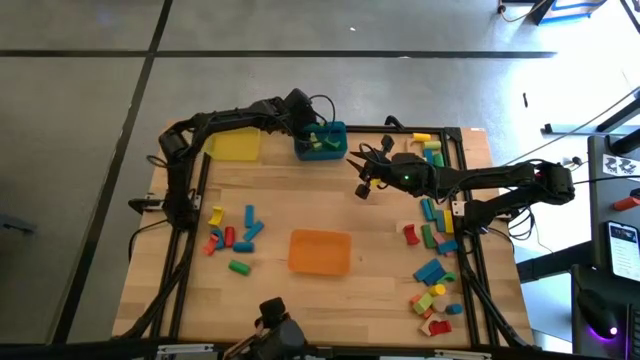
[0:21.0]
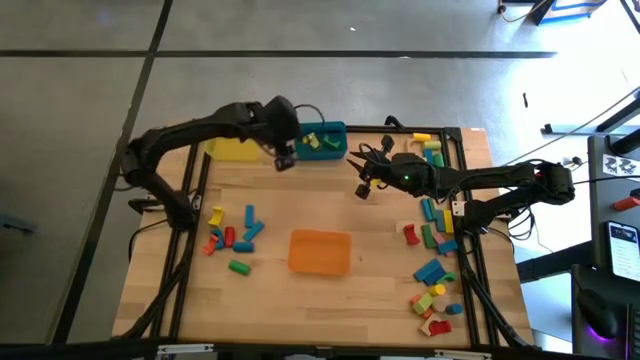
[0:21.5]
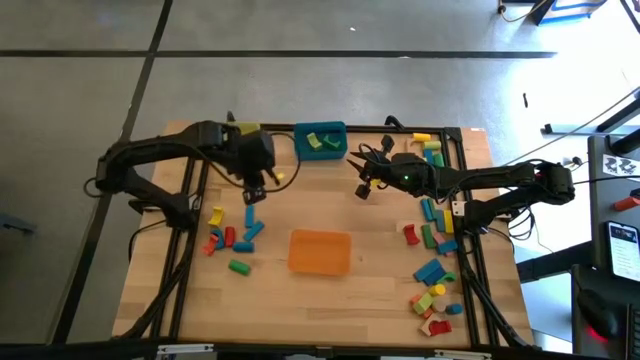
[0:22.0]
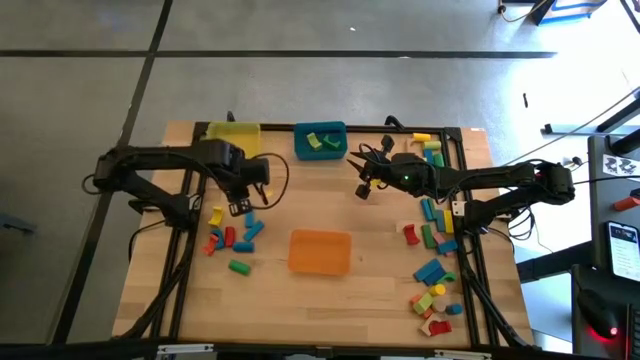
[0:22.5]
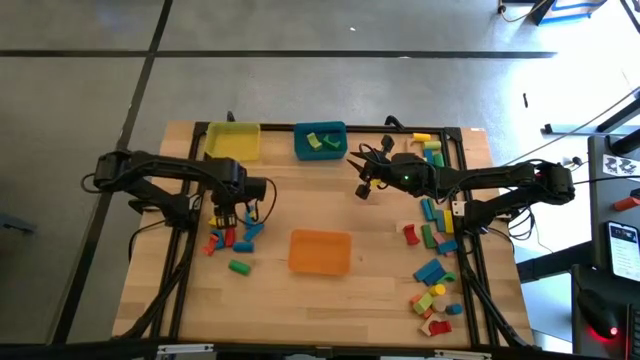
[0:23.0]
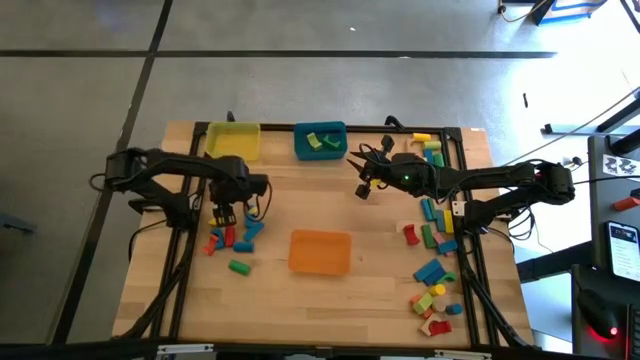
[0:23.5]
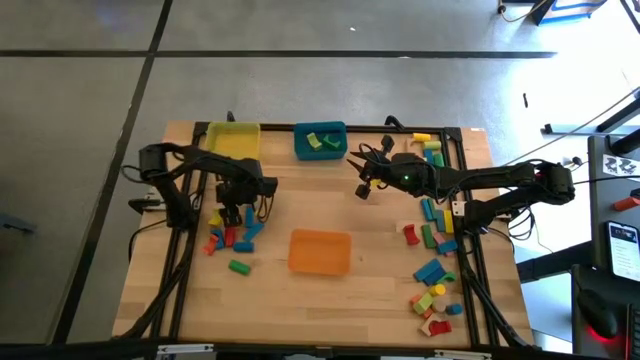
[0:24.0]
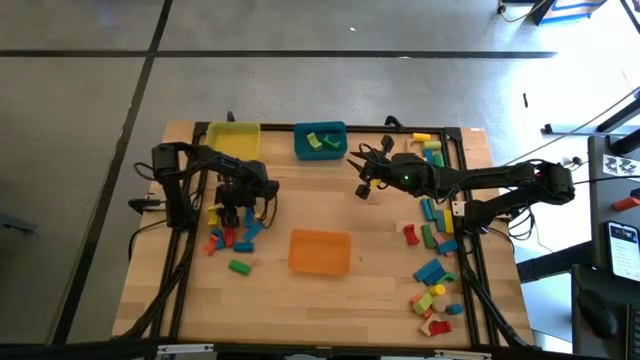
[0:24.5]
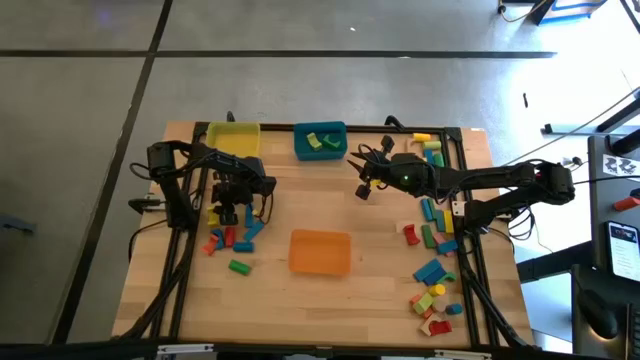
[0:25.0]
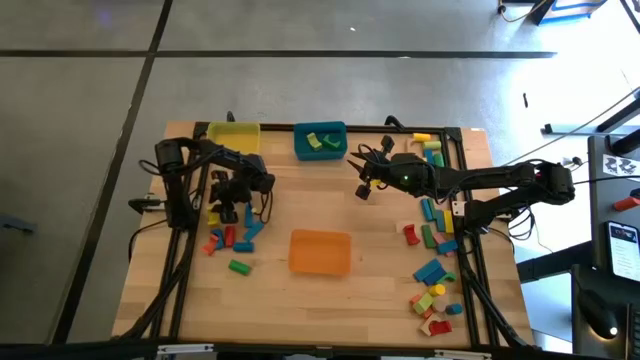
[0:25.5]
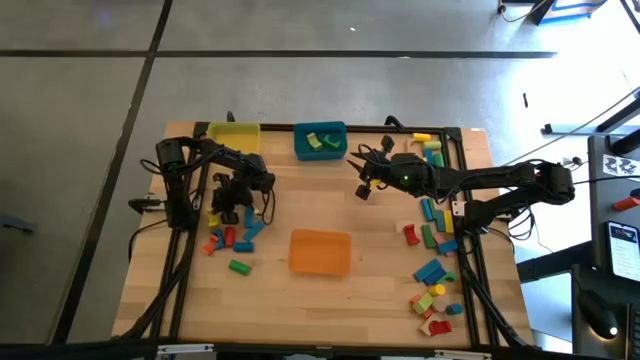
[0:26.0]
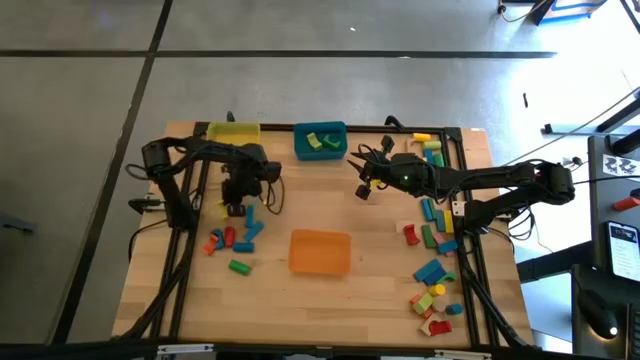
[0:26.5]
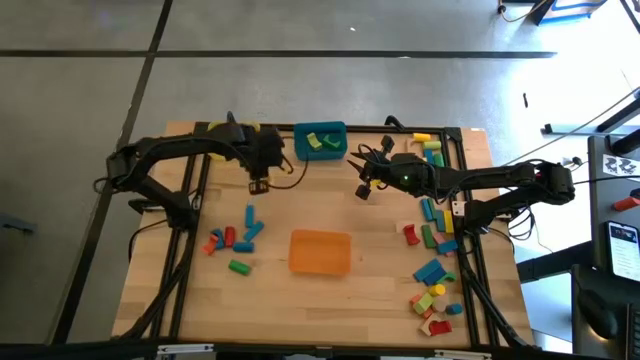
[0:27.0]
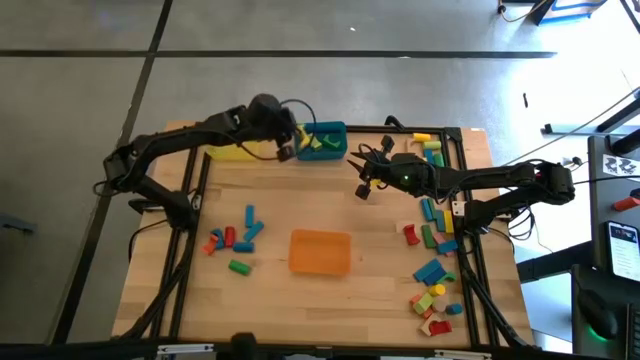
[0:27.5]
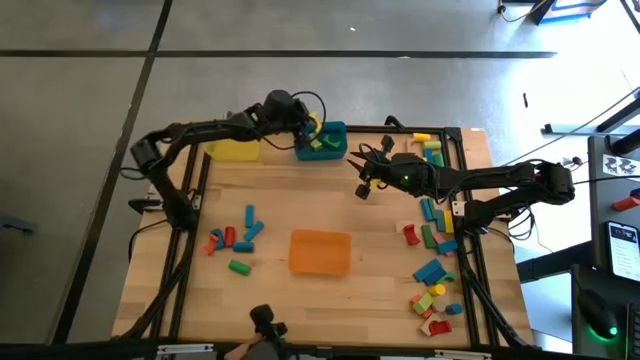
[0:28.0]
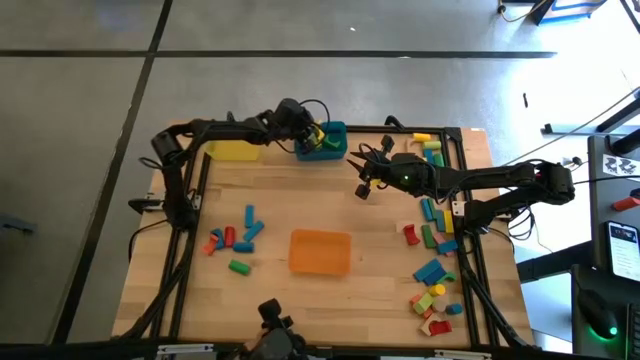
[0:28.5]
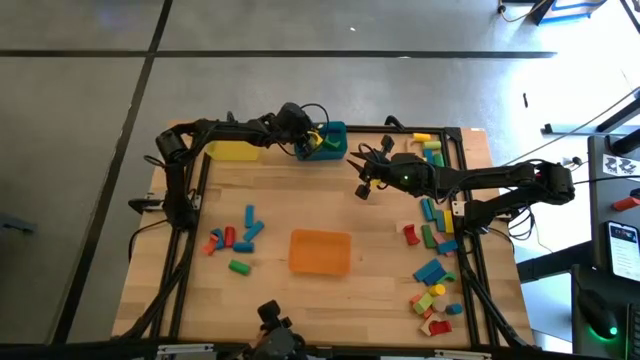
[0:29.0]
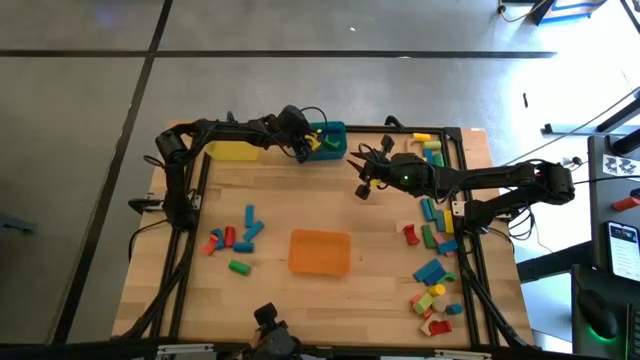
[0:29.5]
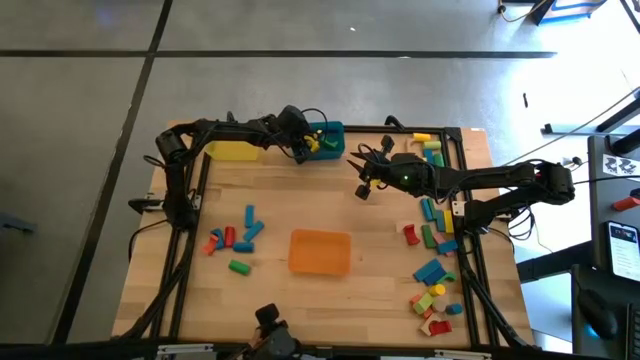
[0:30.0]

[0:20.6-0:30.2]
Task: Sort blocks by size
Put the yellow arch block into the blue bin

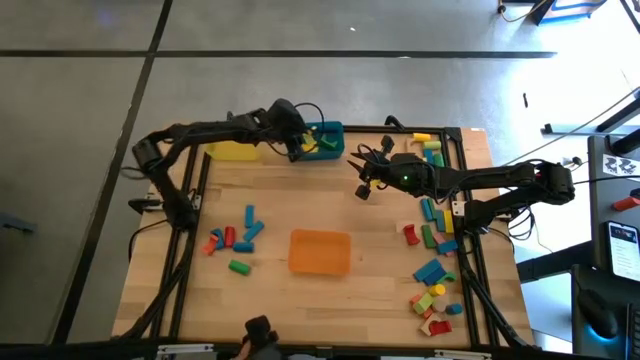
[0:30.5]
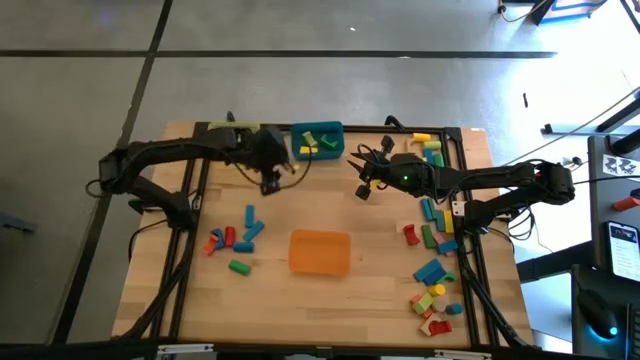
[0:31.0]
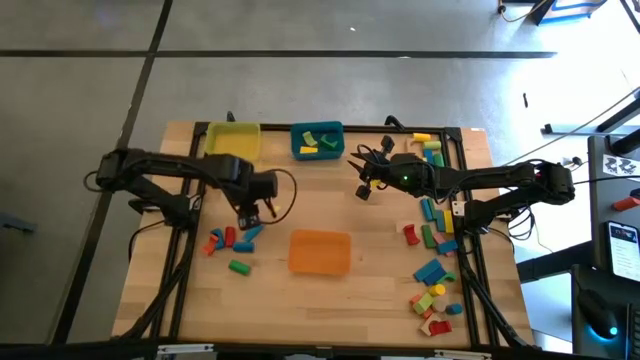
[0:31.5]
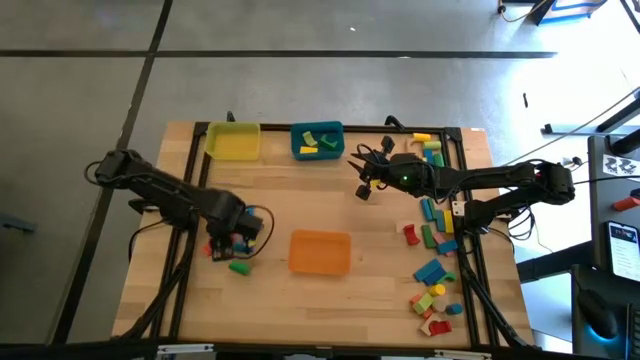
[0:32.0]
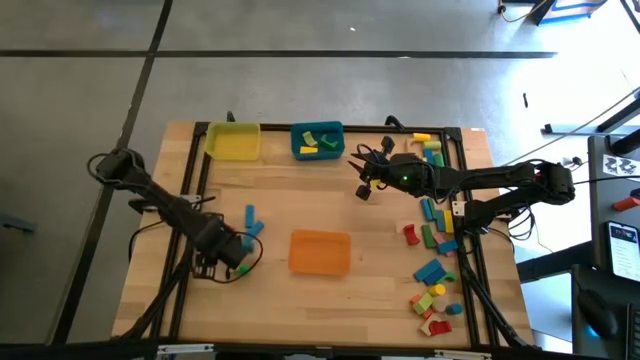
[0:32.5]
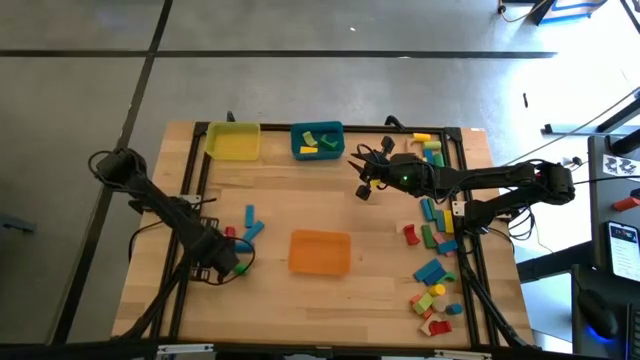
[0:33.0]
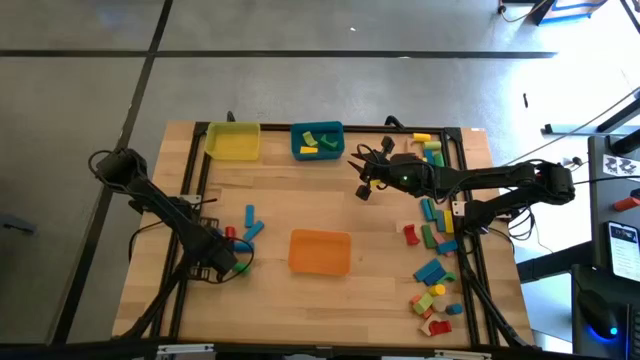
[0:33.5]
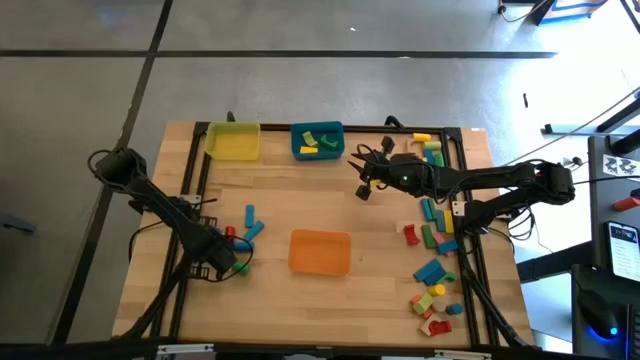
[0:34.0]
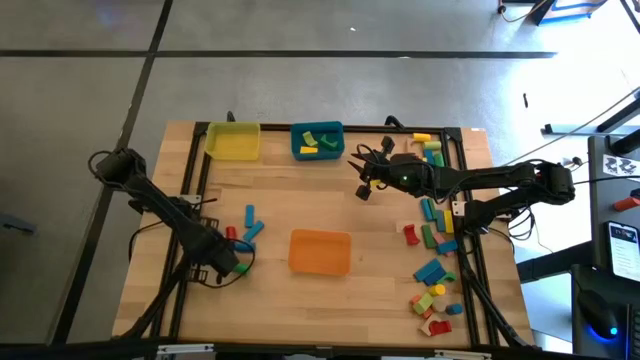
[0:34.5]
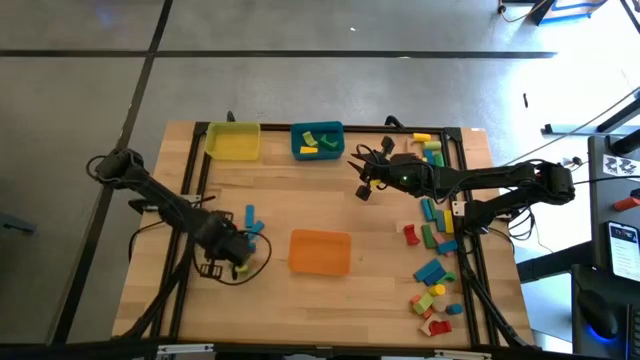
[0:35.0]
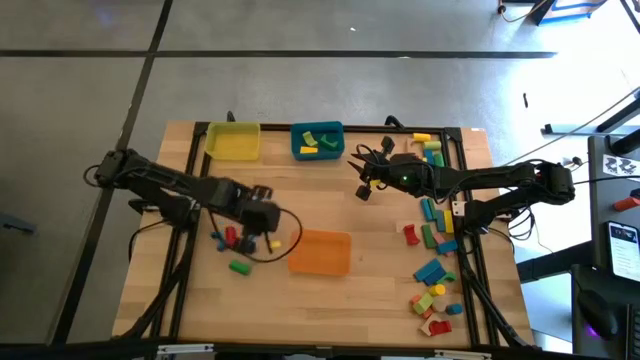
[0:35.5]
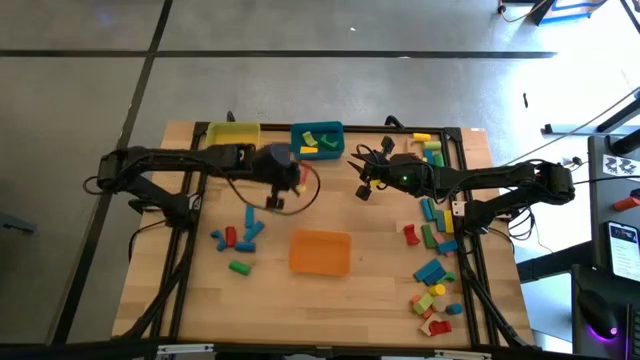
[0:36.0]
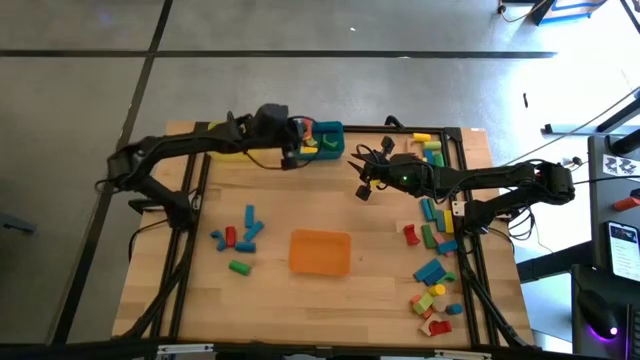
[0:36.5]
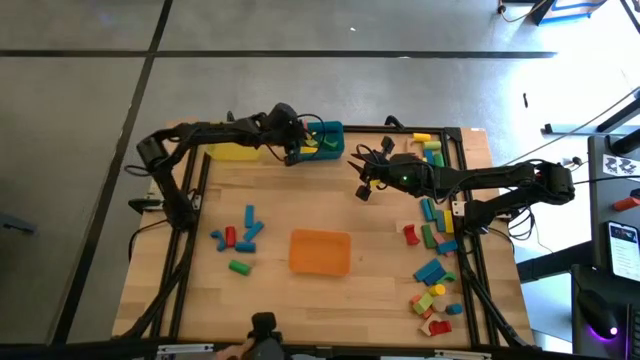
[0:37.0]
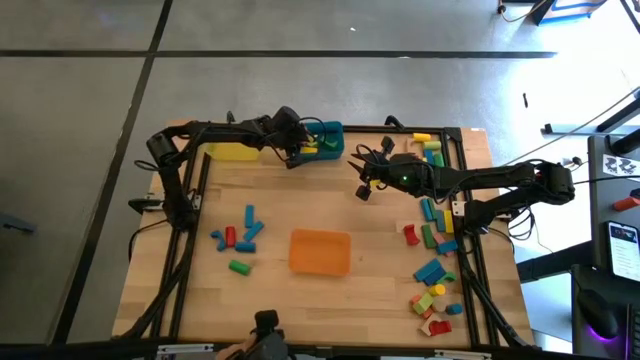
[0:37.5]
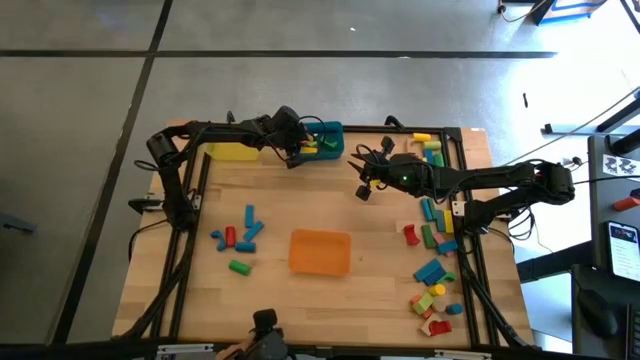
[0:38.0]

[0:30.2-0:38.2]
Put the orange arch block into the blue bin

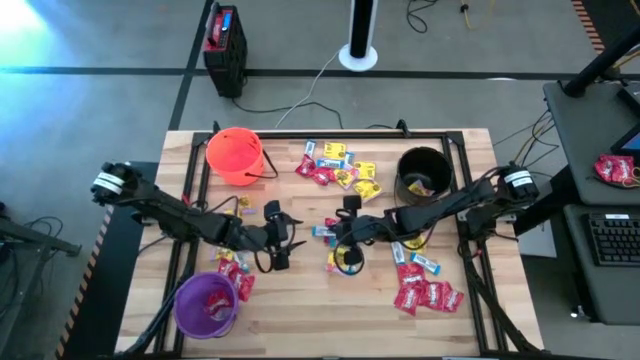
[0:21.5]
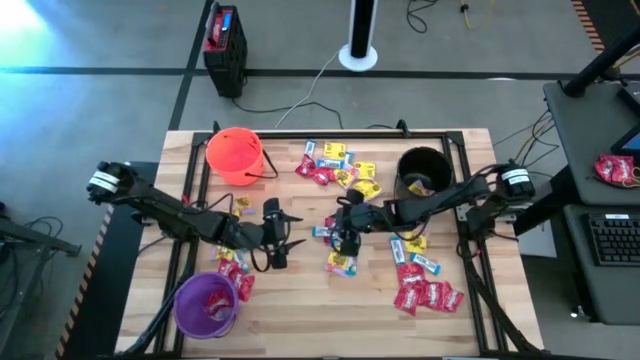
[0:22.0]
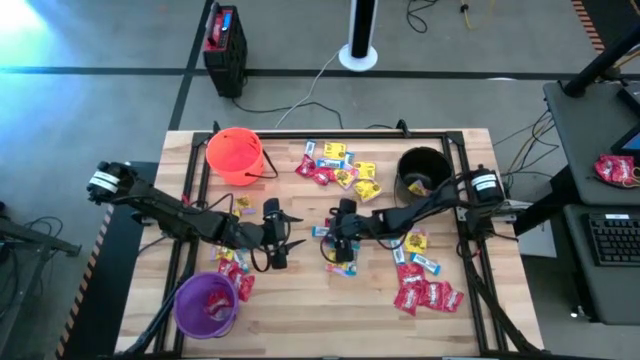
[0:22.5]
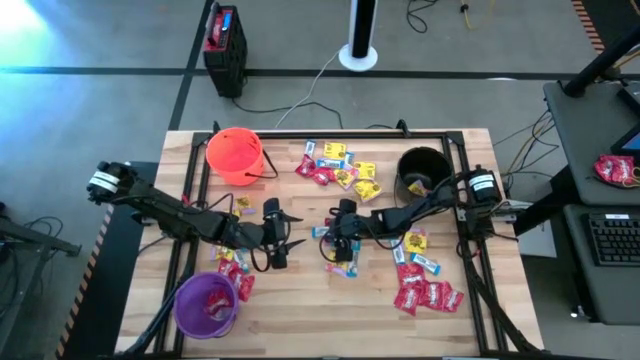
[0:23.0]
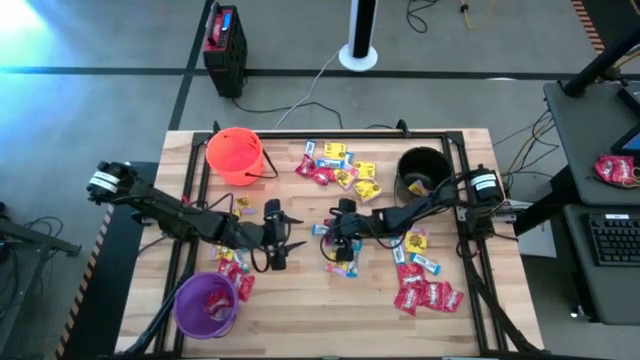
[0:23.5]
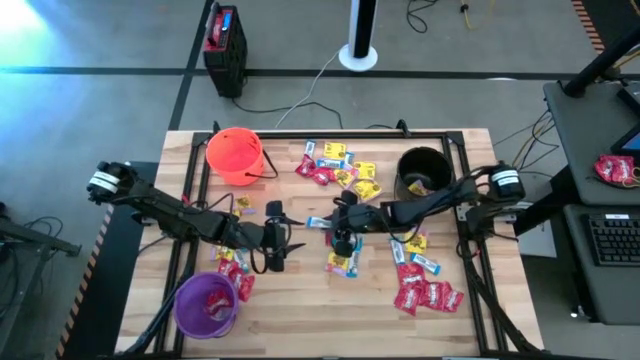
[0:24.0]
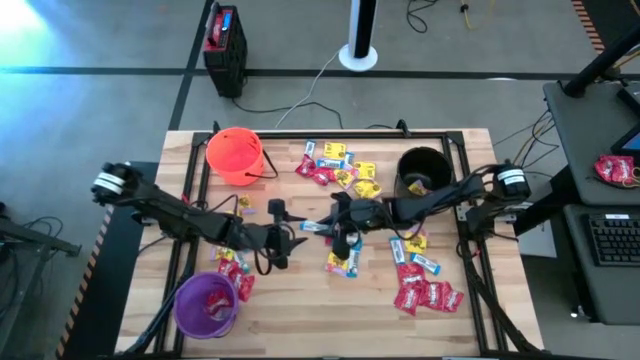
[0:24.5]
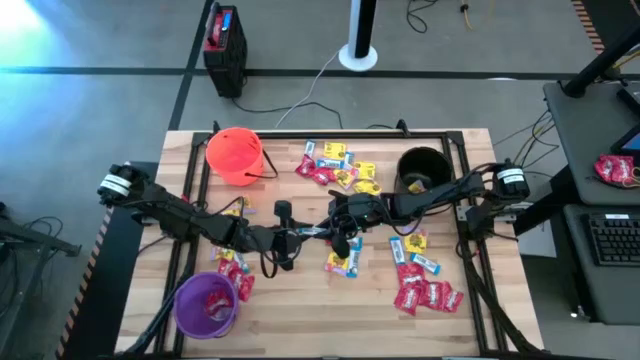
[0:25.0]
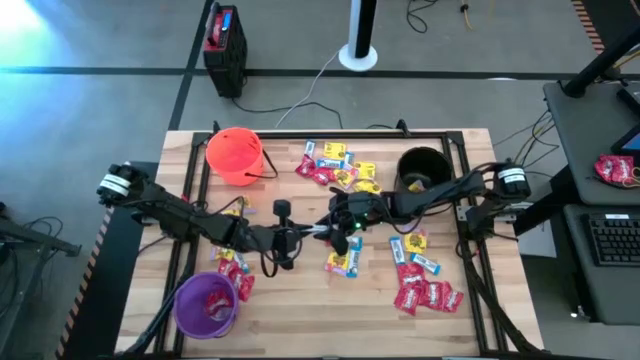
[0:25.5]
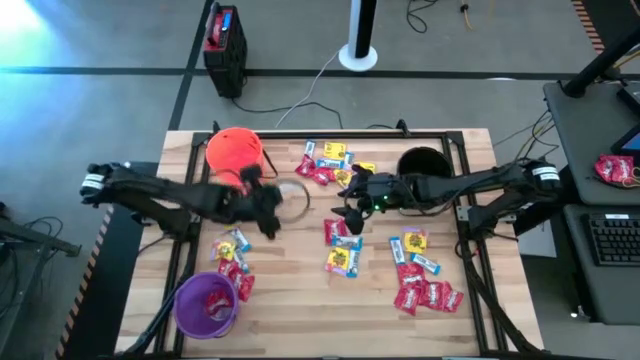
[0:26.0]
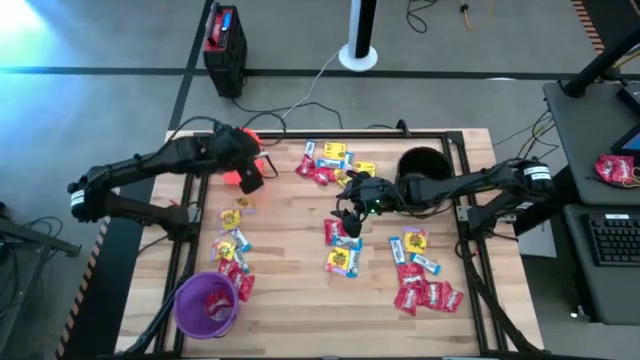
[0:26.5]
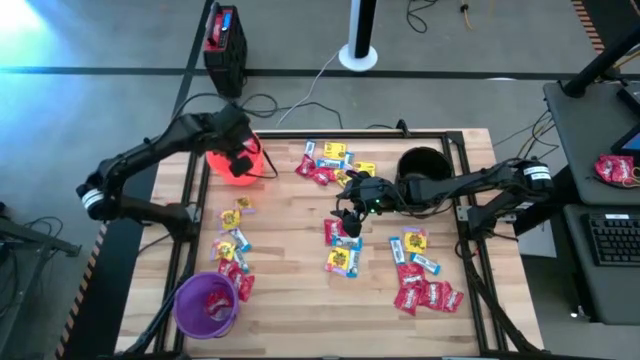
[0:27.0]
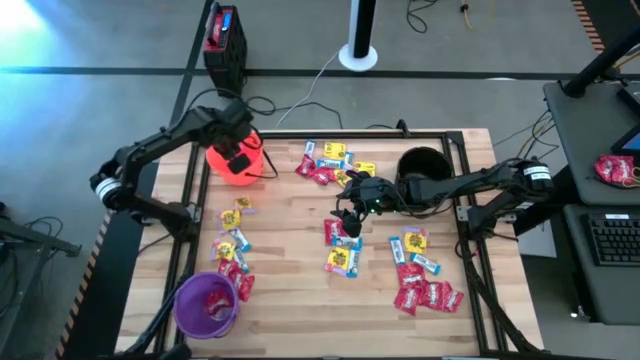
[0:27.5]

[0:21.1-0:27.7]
Task: Sort candy by brand, put in halloween buckets
Put the white chocolate bar into the orange bucket
